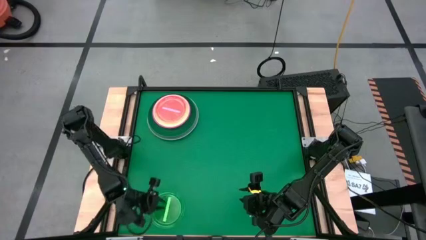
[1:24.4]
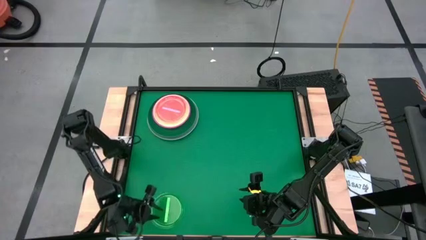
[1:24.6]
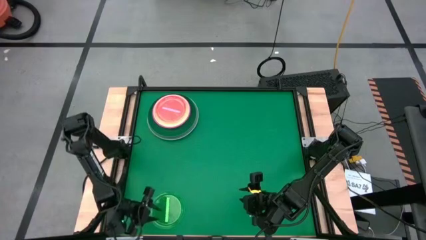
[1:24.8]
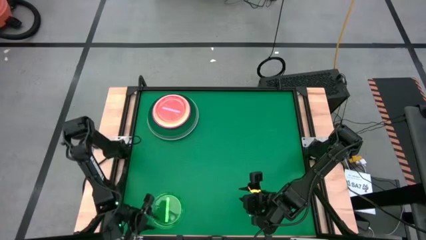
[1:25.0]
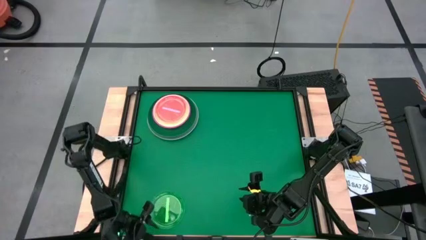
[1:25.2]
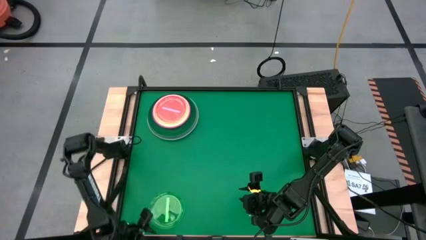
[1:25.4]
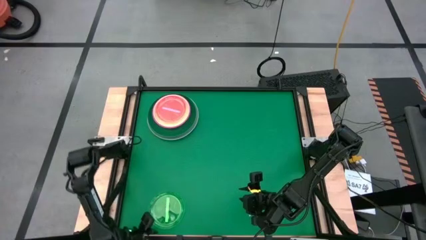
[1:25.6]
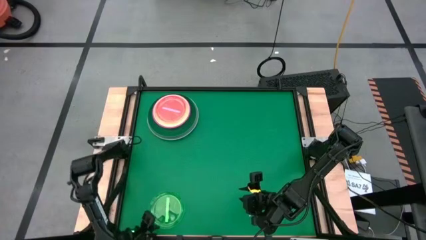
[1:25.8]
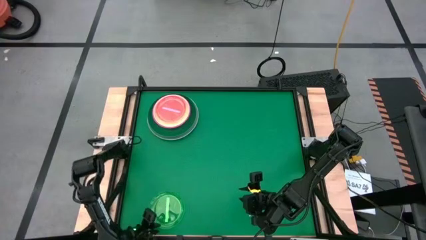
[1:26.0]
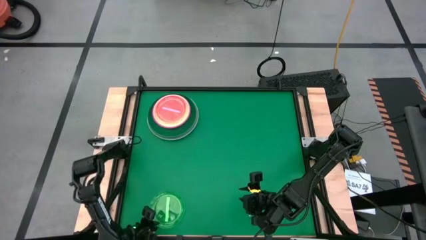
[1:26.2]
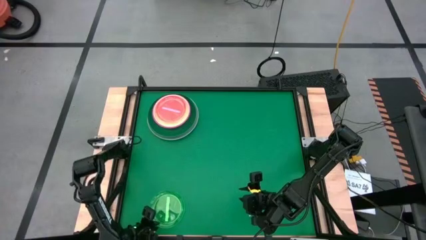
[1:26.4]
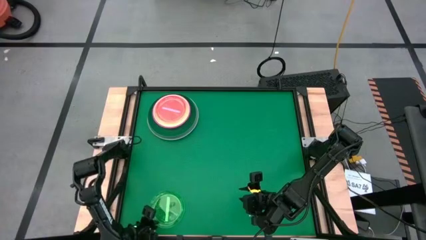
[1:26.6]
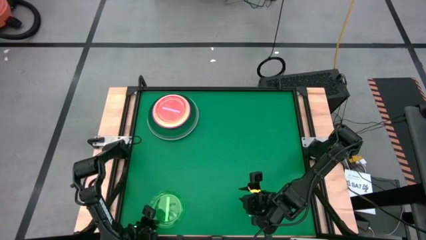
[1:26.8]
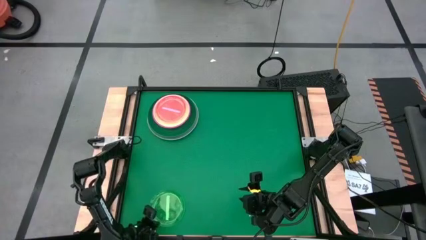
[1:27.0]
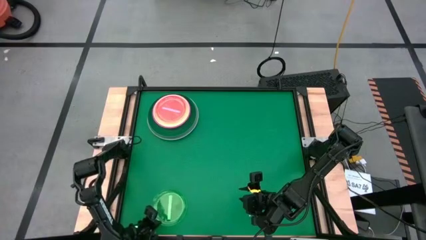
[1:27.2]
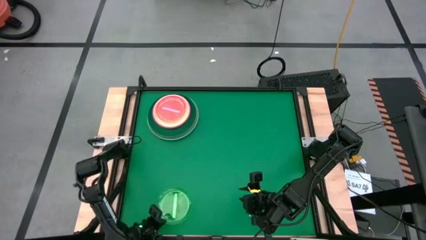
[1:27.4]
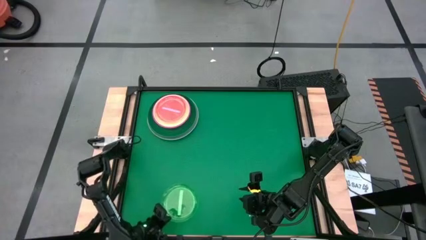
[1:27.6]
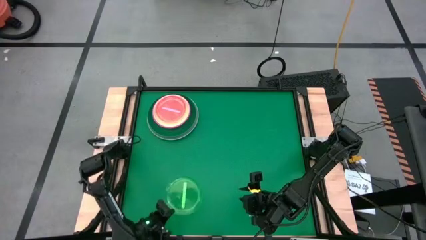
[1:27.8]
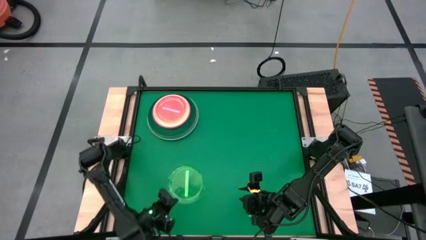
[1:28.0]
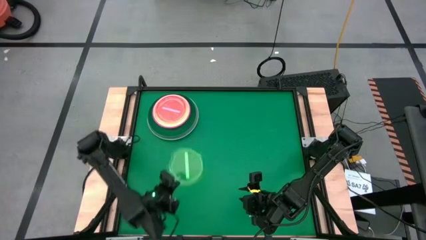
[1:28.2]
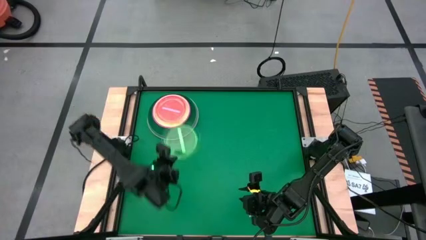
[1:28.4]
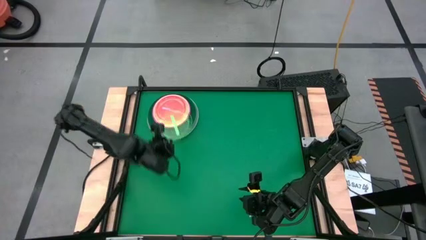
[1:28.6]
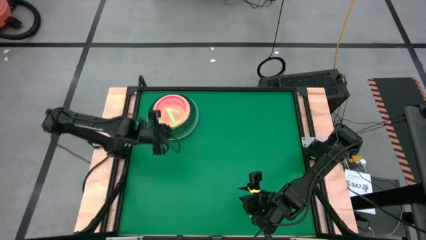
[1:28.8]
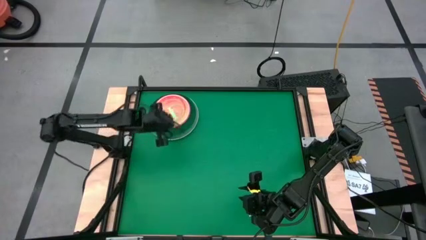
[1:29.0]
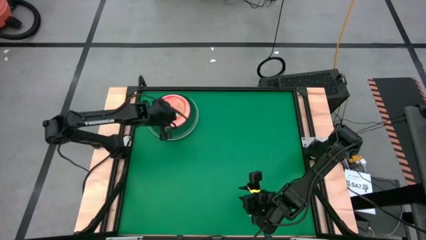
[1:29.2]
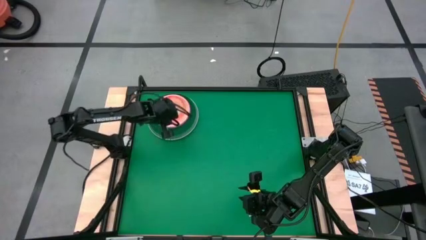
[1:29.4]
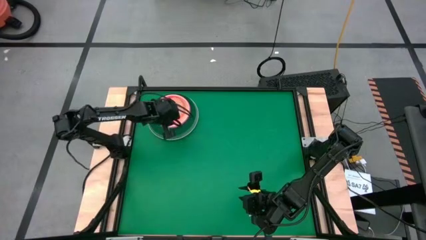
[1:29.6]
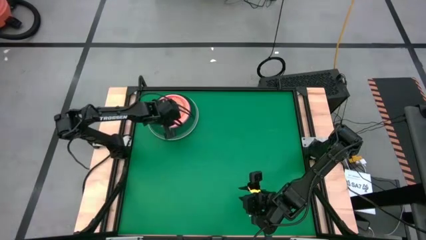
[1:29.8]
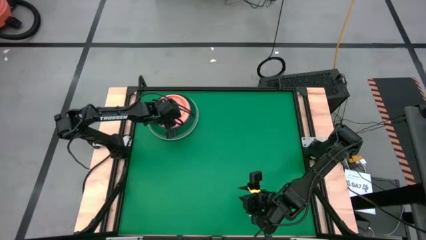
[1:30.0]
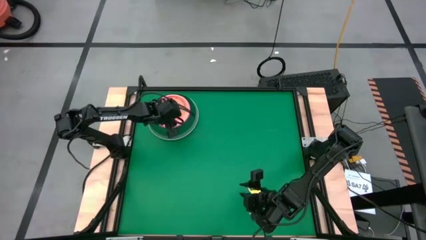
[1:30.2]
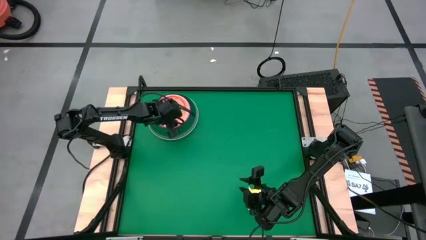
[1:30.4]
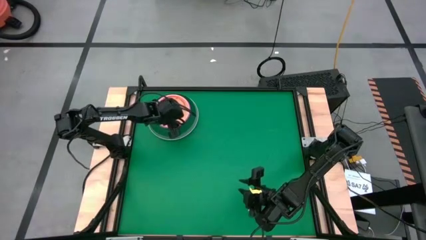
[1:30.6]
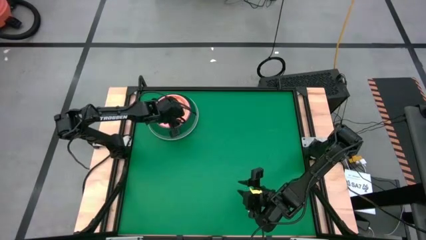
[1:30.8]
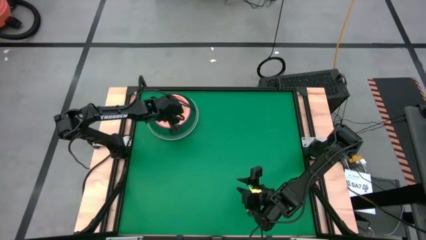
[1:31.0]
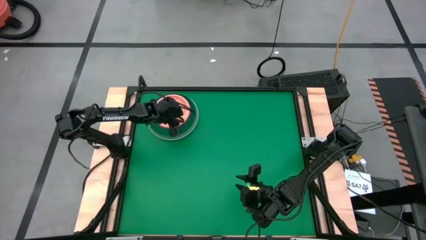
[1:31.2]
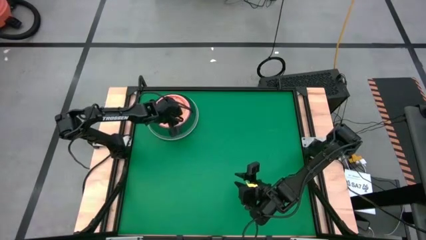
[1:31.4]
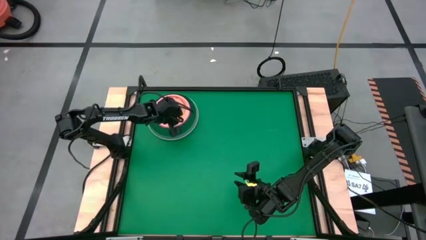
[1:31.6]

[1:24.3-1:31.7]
Task: Stack plastic plates
Stack the green transparent plate on the pink transparent plate

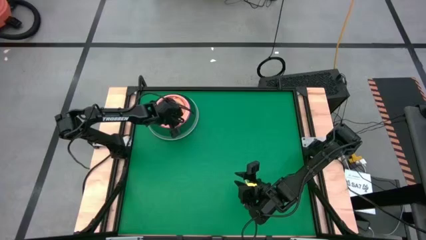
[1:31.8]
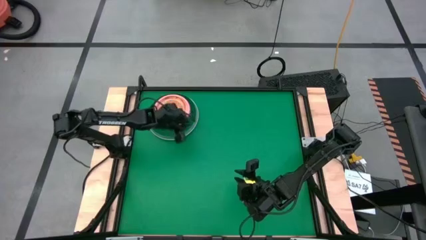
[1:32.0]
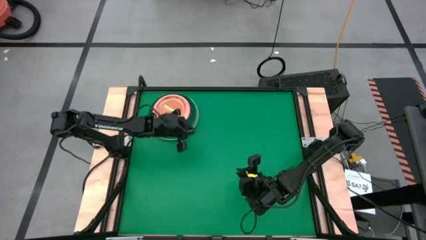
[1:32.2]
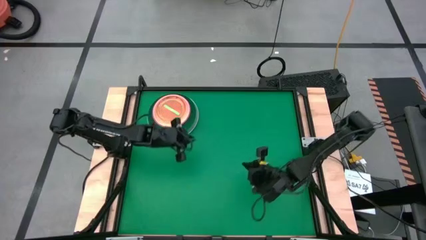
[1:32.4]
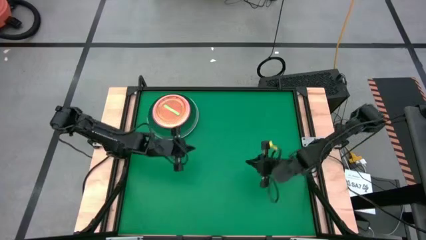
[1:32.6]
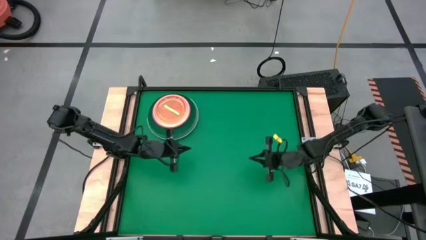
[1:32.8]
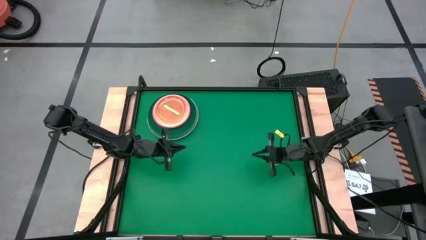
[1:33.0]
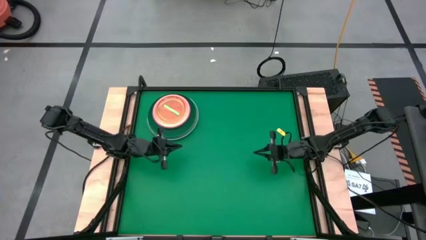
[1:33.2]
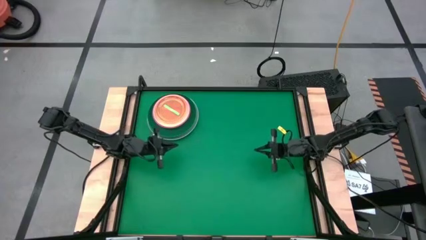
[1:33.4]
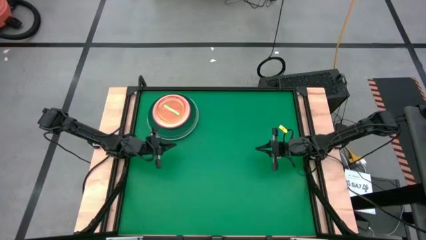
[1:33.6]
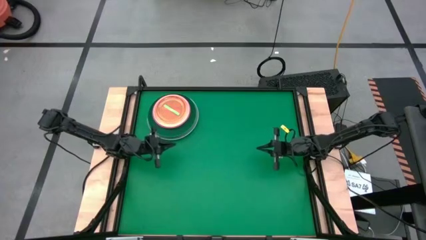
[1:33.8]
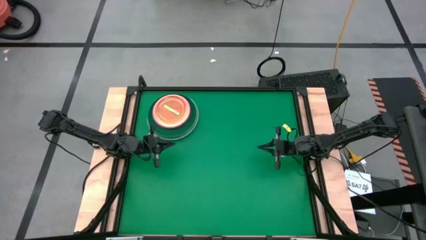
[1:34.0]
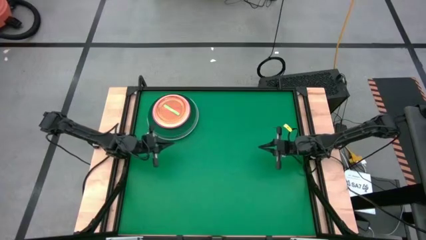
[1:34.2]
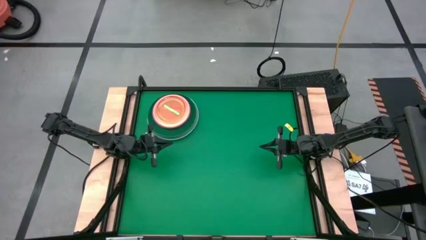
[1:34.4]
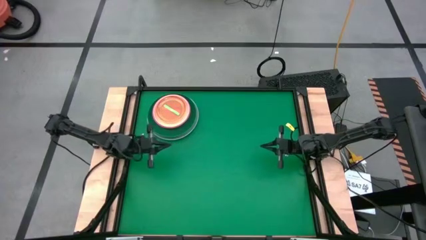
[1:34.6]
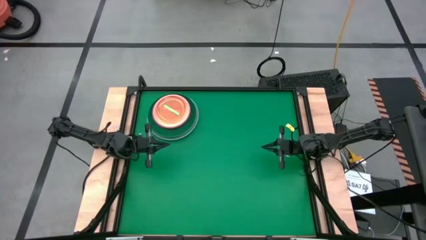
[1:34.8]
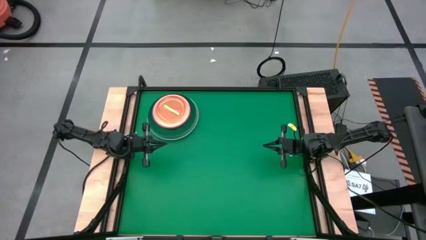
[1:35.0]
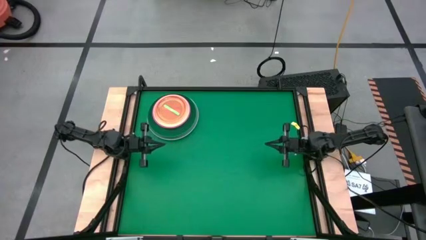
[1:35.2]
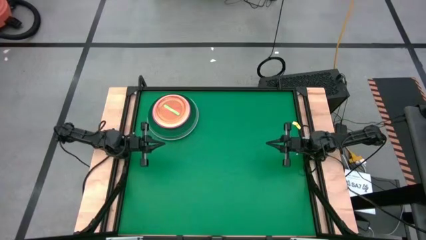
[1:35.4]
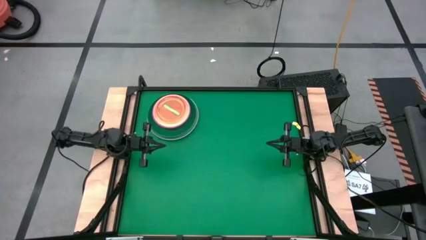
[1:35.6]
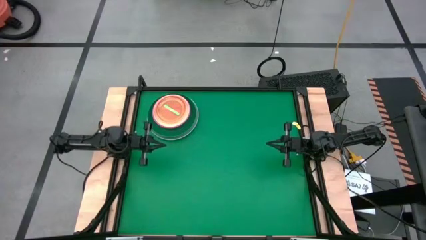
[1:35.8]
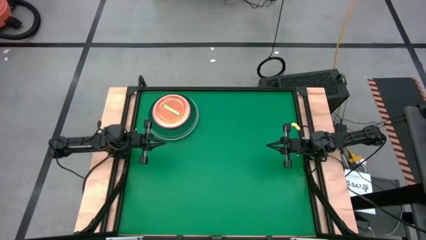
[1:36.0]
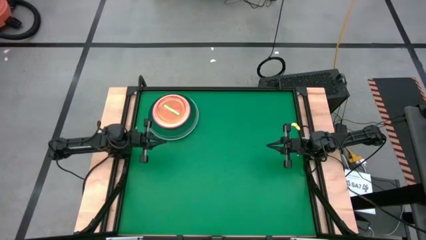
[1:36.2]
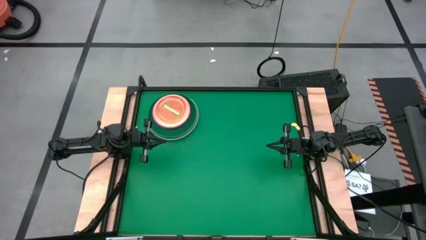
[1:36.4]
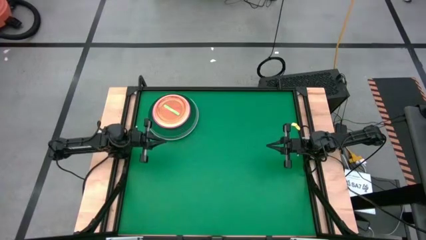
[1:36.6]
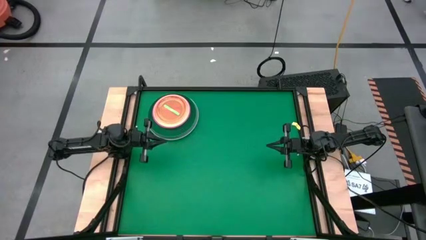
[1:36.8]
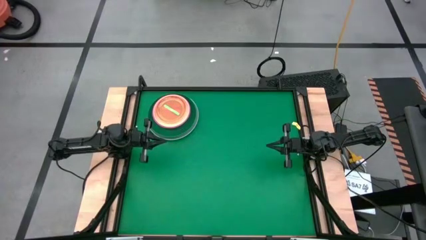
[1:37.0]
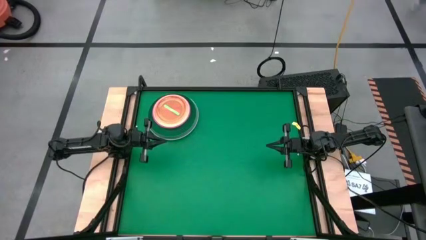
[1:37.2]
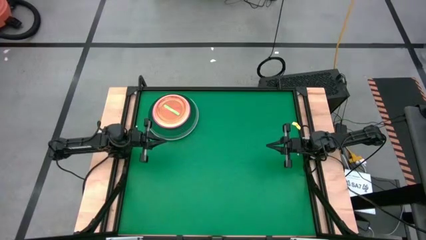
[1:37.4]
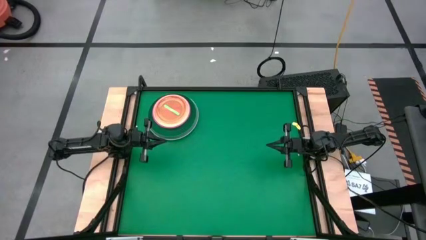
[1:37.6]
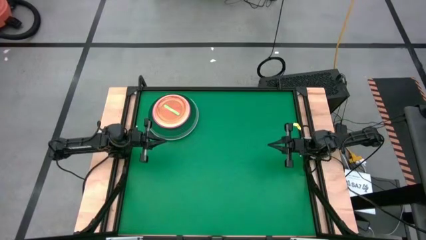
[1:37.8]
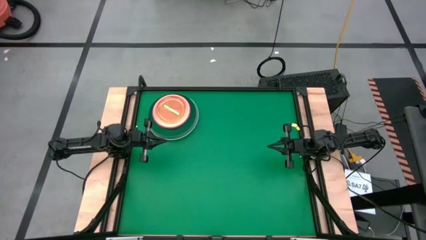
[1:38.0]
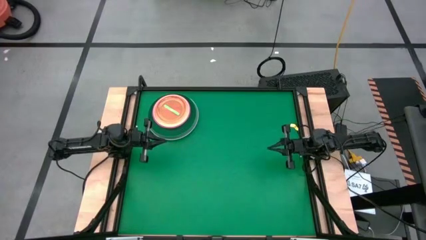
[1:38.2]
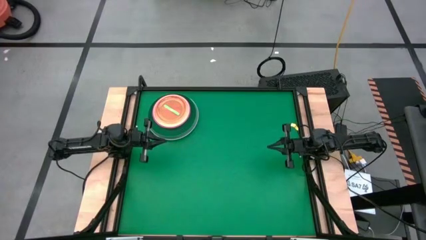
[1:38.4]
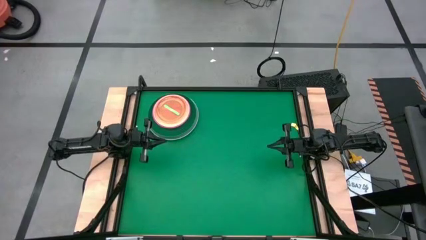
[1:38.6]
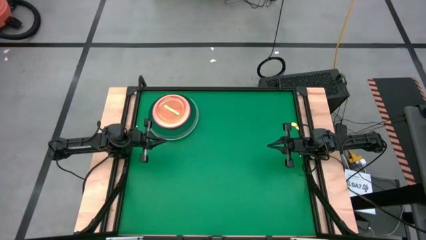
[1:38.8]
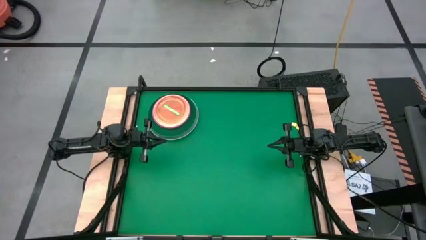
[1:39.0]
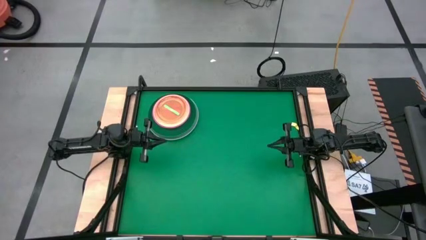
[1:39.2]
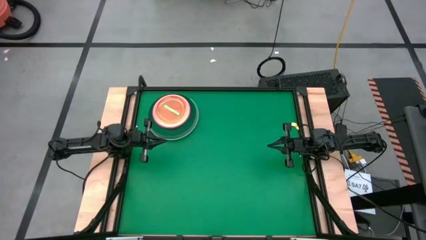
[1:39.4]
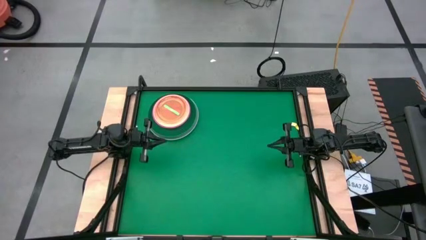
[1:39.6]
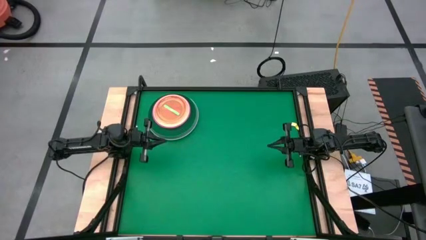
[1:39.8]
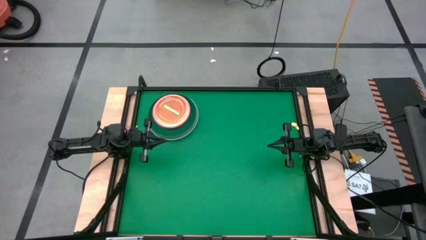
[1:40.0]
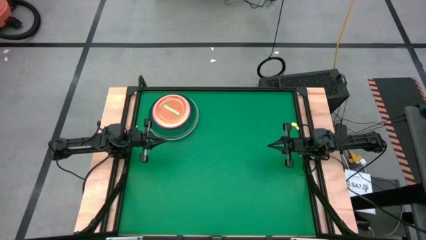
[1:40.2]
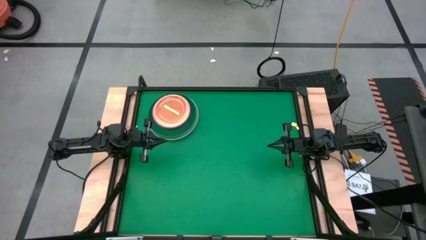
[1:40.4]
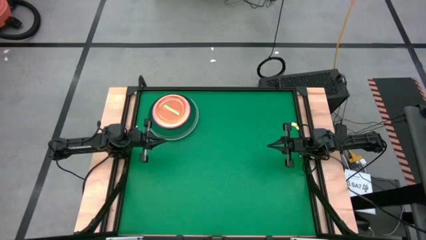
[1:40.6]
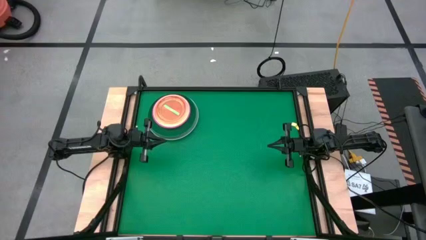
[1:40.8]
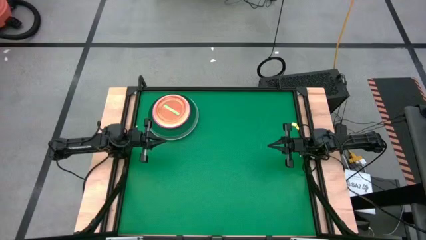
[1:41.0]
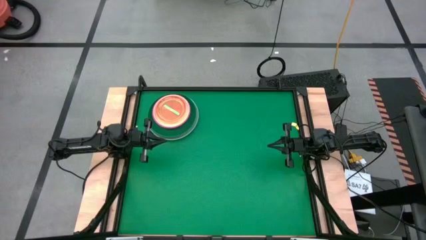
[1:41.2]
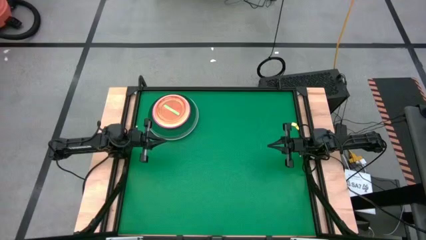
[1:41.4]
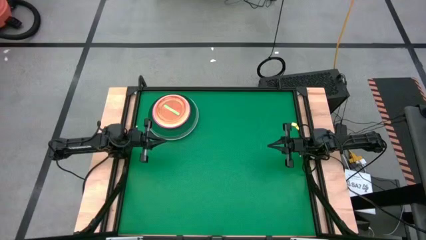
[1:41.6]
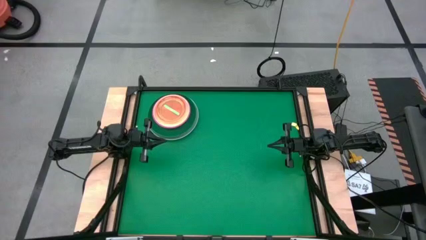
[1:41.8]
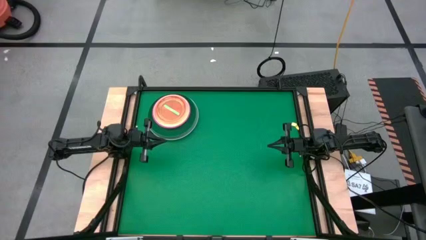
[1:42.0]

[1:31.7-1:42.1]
Return to Home Position
